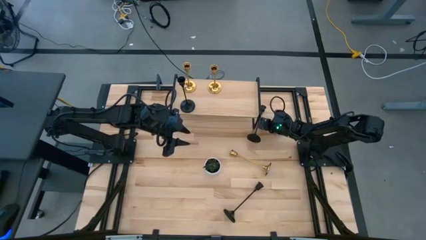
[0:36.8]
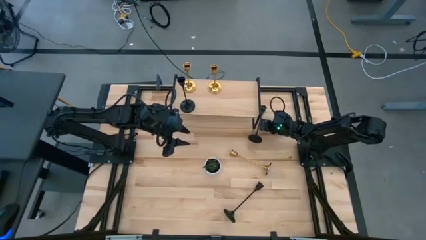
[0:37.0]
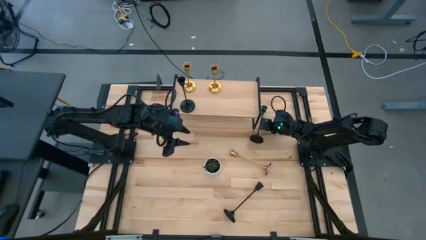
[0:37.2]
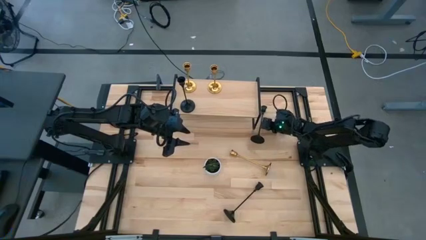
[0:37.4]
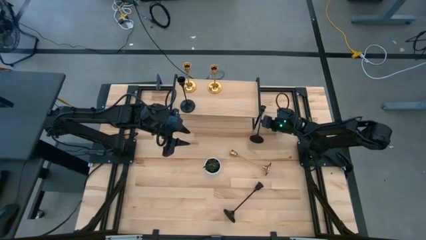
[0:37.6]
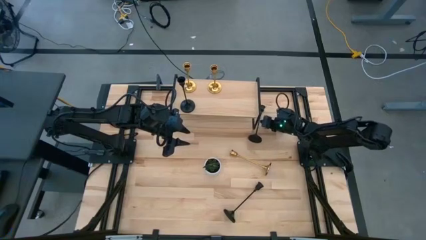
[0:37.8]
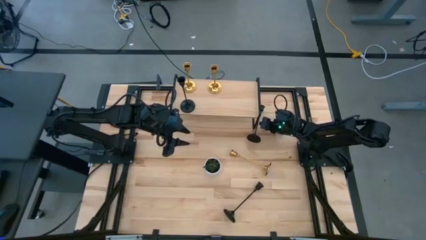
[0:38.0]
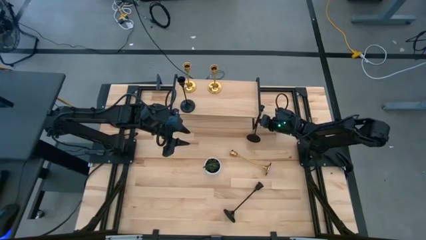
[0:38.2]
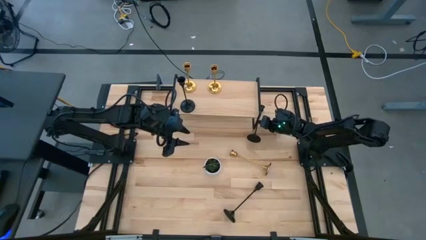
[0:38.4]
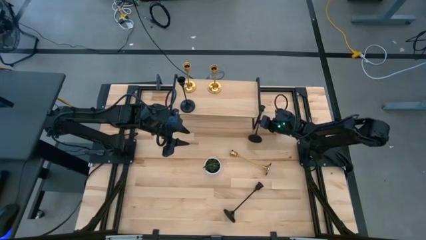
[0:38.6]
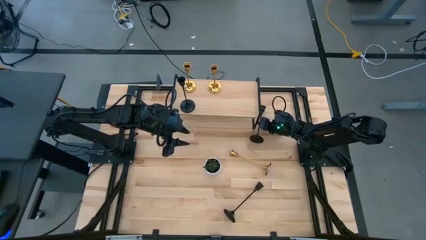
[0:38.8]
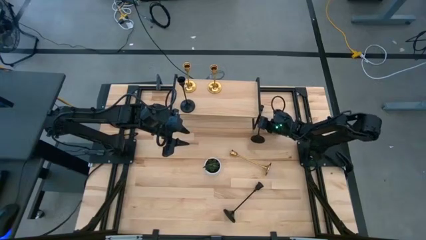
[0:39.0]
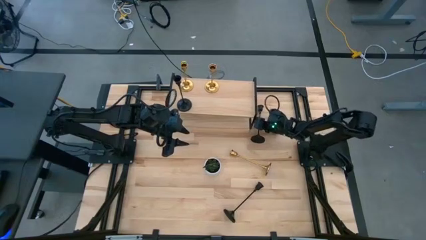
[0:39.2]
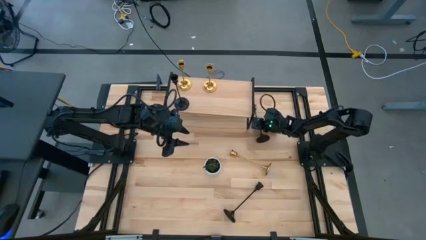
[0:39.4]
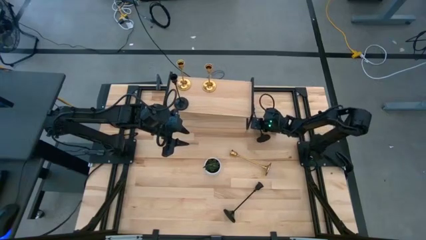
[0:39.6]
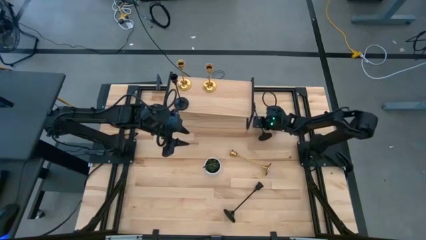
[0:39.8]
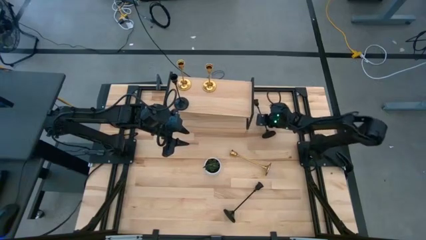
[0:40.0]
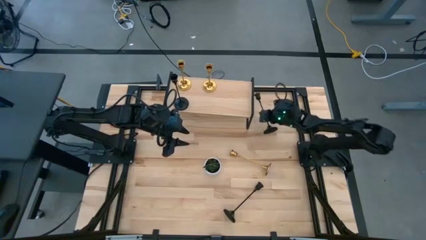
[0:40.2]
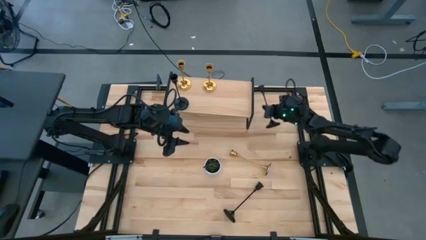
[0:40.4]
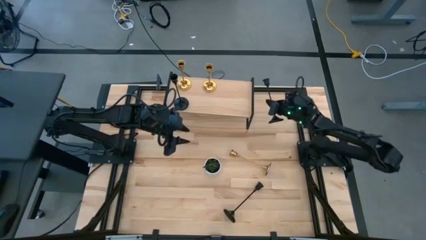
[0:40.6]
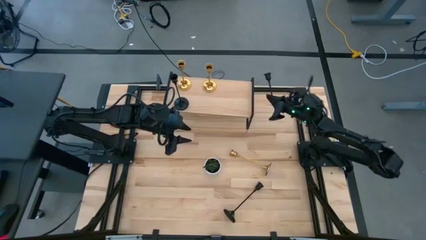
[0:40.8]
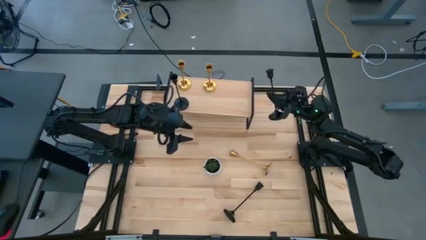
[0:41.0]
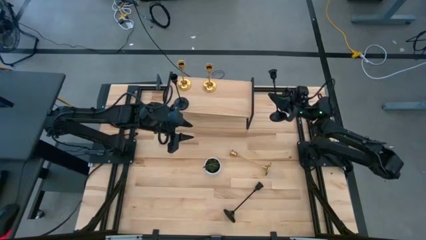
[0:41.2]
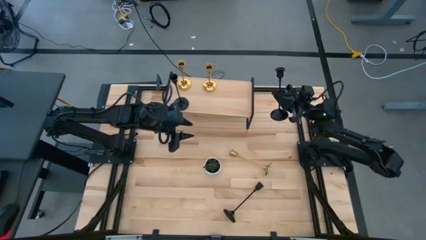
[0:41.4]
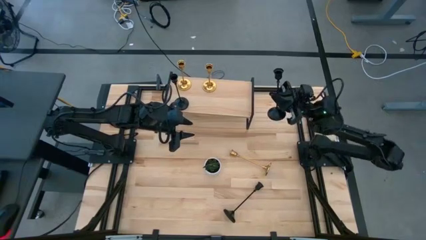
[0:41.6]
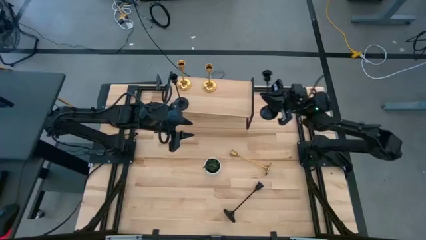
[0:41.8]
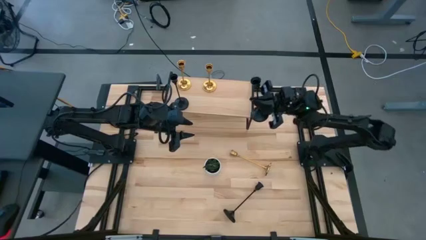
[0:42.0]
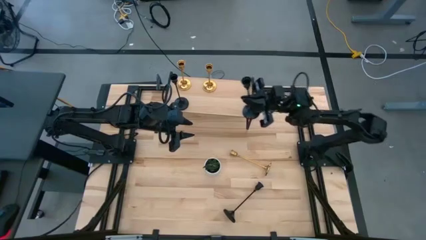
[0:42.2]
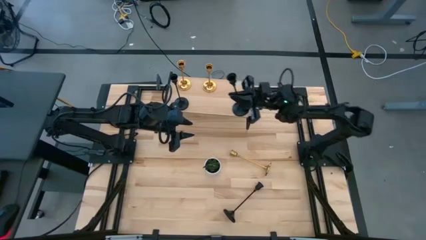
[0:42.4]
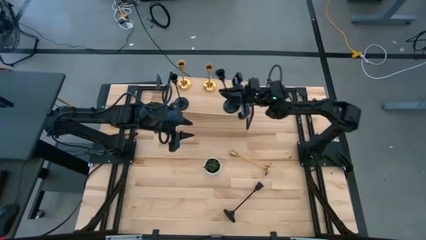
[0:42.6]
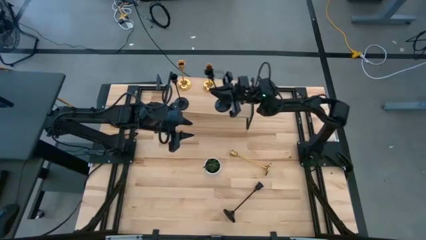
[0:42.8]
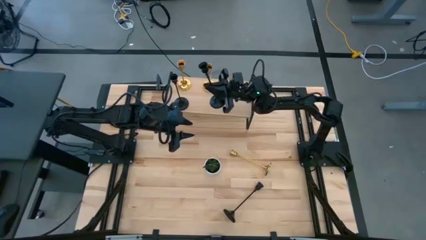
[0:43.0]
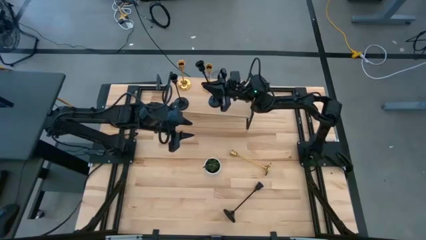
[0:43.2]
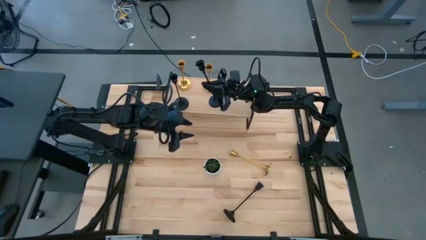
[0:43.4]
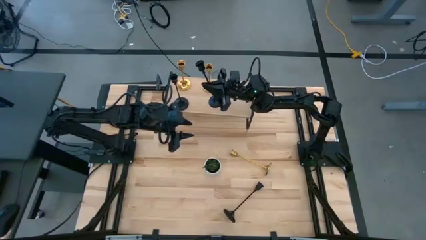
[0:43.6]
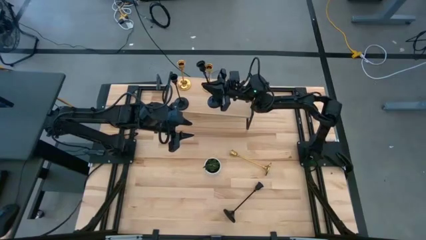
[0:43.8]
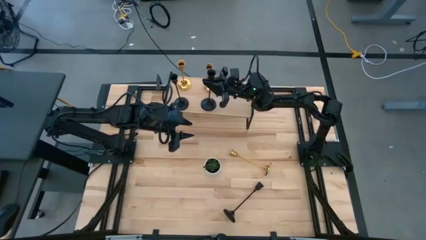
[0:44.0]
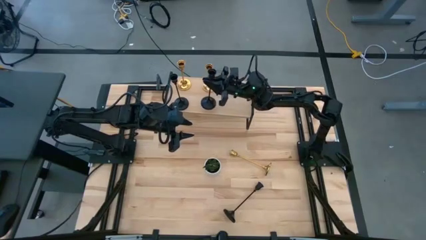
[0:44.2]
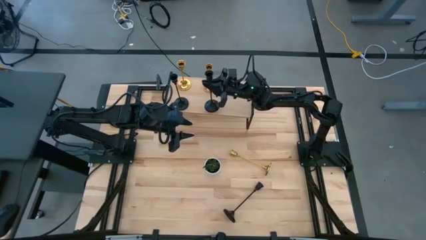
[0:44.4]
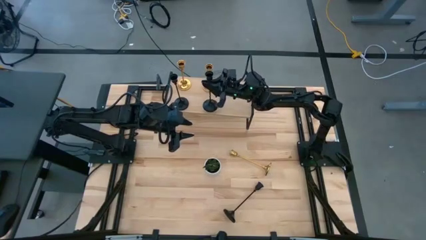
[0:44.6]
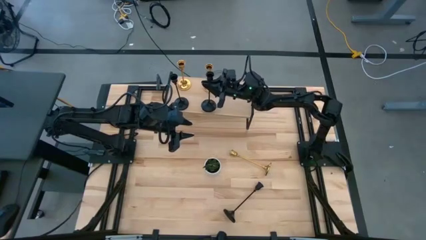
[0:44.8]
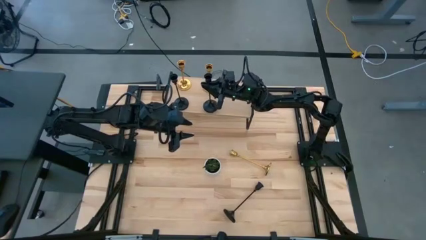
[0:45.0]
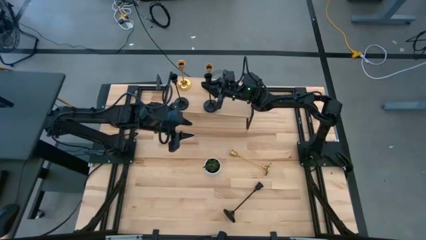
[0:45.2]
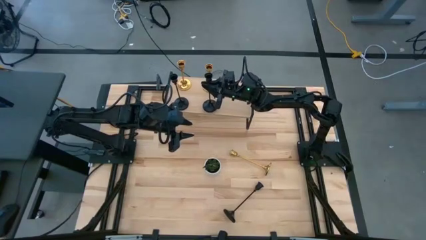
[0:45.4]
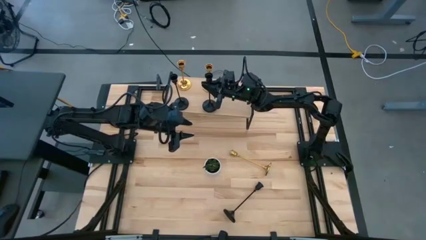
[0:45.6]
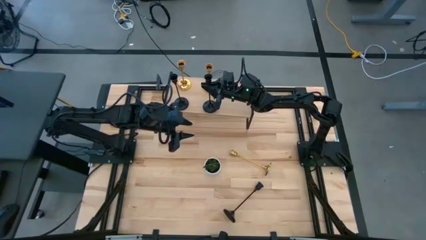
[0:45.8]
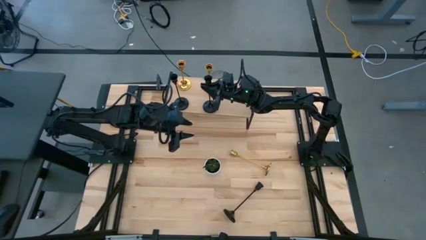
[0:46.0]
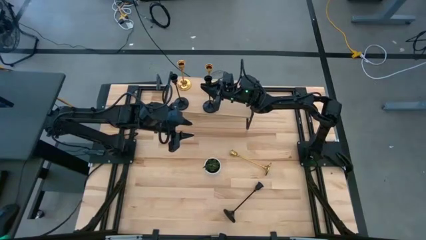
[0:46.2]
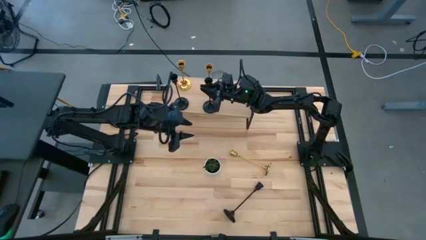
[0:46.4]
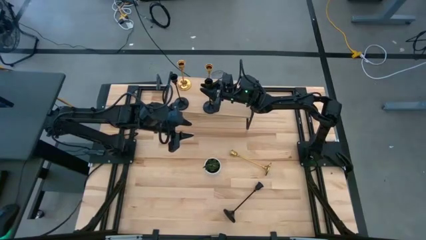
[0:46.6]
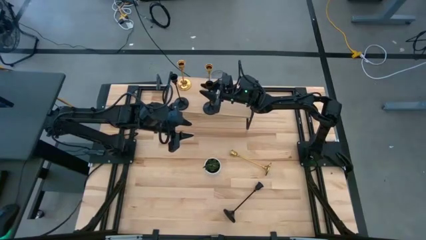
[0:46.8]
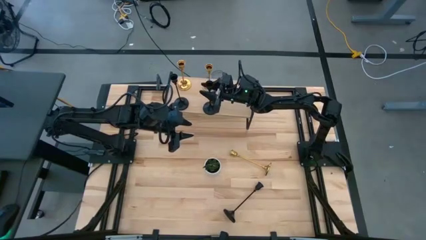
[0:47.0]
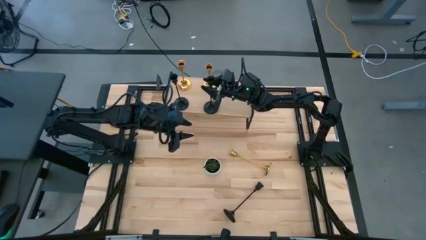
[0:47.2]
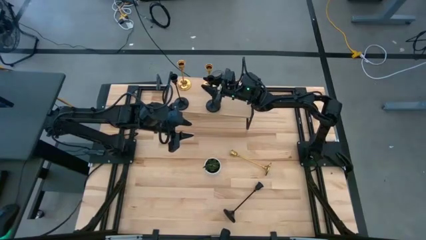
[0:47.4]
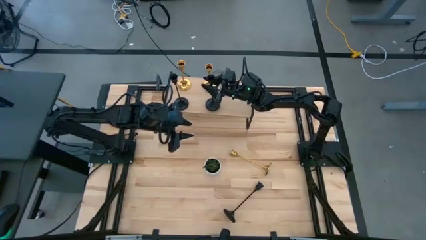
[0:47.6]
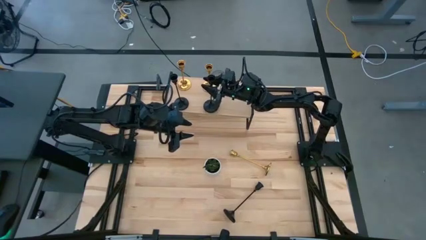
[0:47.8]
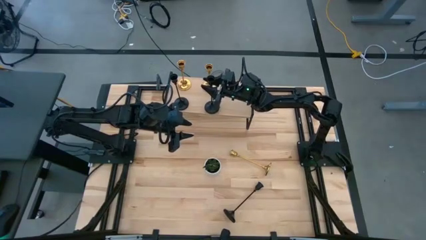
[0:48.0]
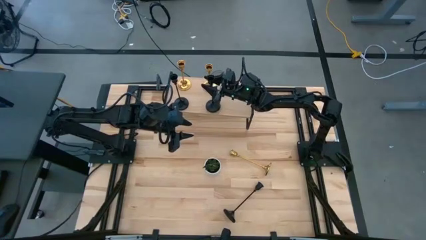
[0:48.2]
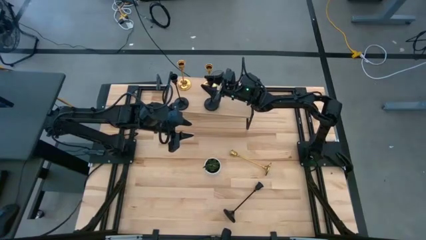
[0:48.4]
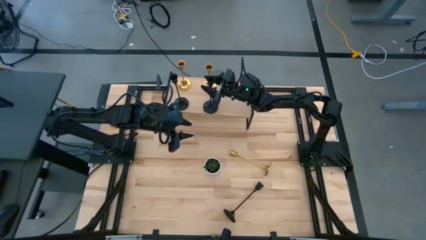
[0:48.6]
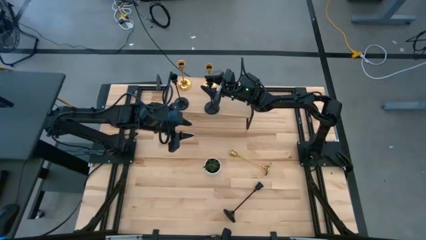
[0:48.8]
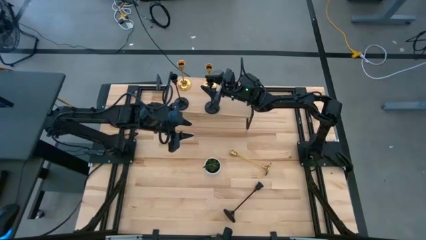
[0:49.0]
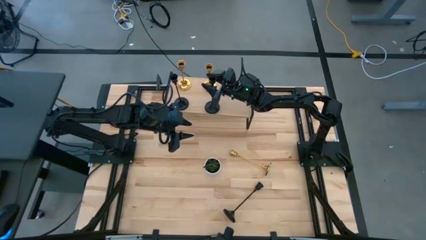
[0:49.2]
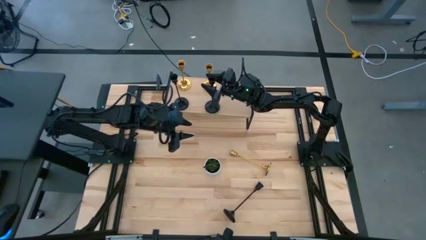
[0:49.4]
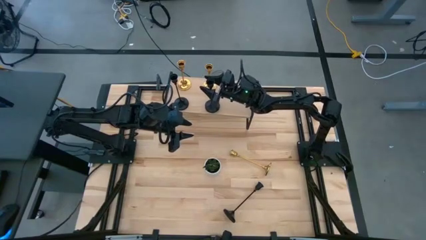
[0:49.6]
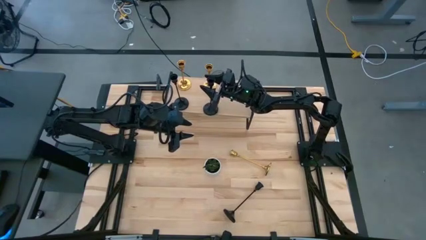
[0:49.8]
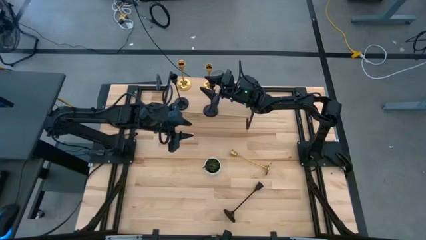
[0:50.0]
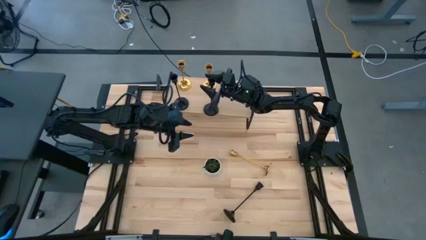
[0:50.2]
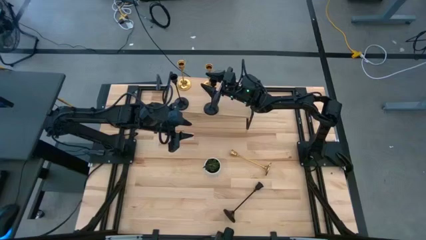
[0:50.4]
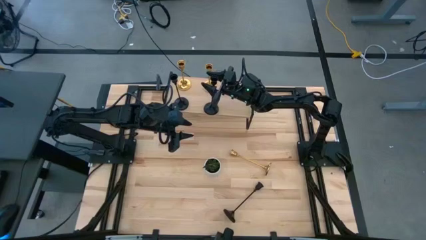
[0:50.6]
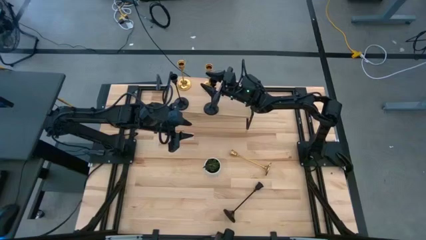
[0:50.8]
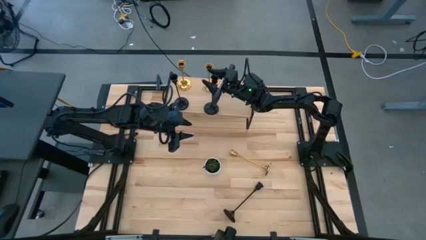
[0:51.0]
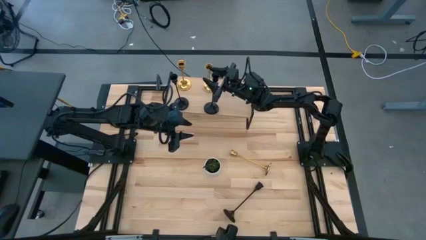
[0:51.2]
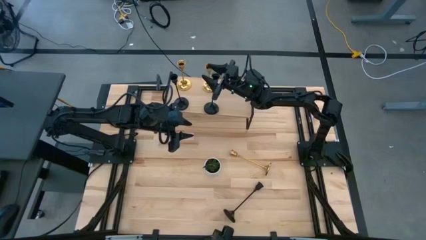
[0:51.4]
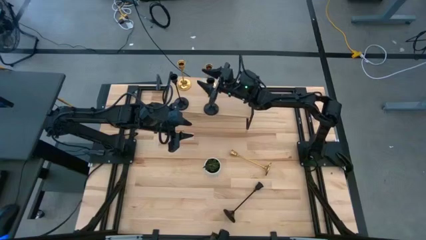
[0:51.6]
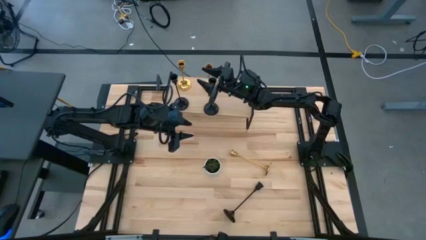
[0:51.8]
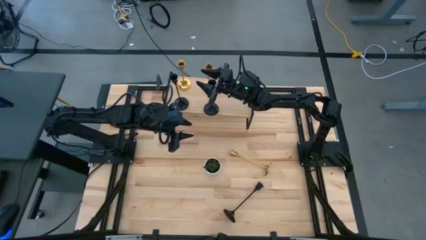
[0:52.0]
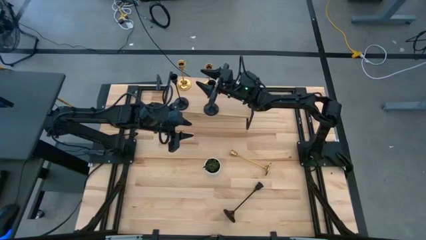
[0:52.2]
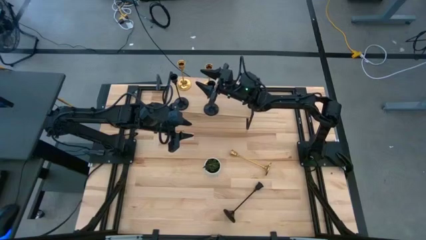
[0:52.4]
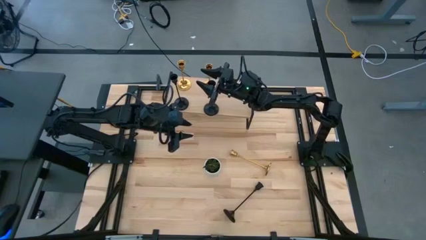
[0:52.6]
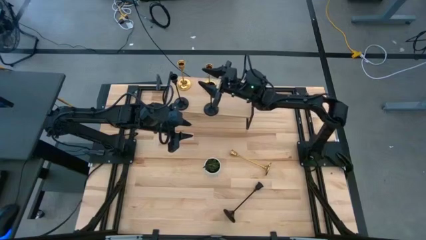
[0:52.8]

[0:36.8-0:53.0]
Task: Pick & Place candle stick holders
Put the top black candle holder on the shelf aligned with the other black candle holder
